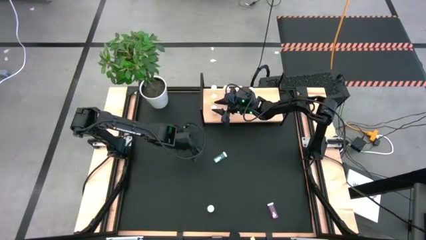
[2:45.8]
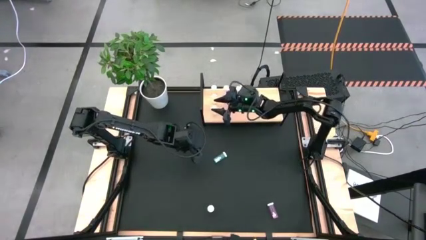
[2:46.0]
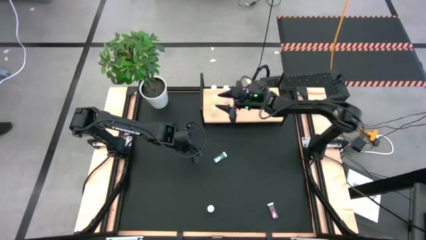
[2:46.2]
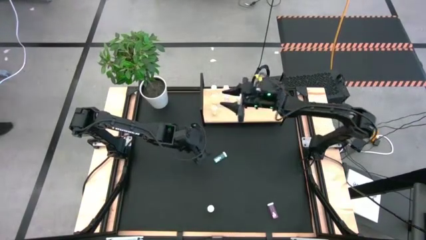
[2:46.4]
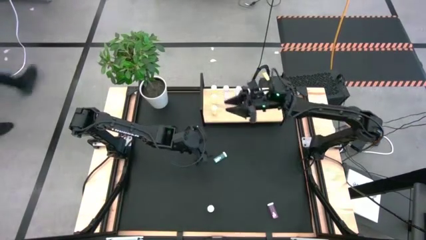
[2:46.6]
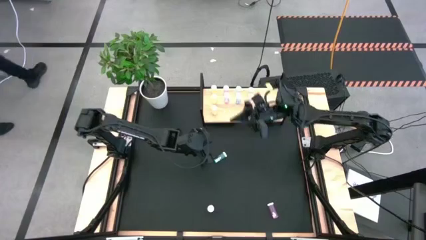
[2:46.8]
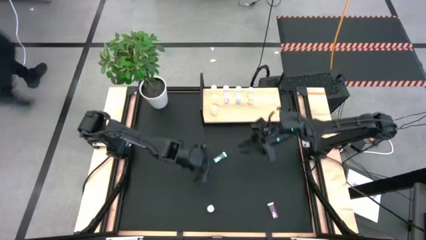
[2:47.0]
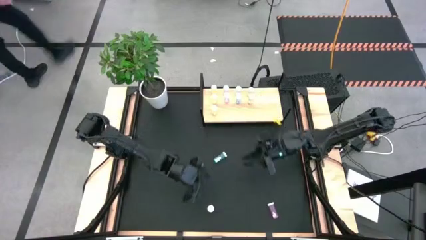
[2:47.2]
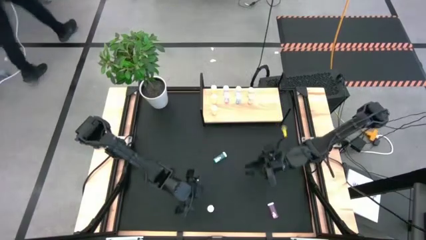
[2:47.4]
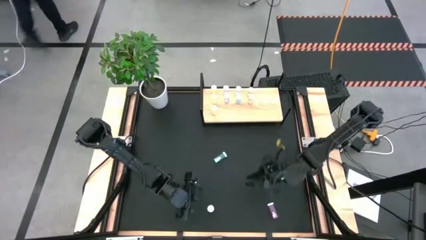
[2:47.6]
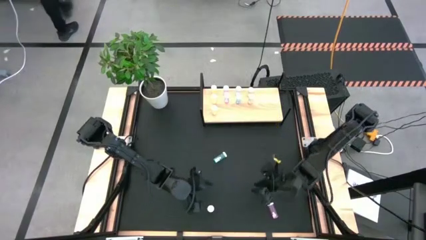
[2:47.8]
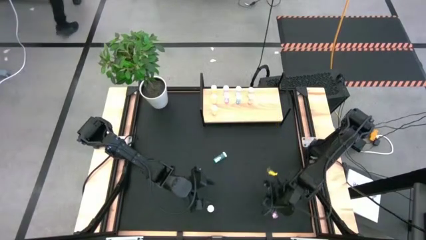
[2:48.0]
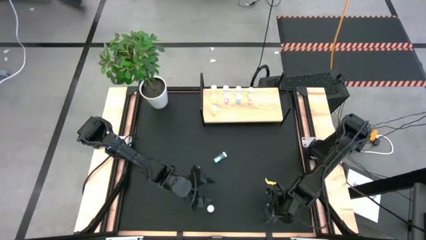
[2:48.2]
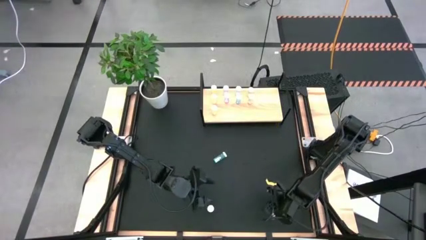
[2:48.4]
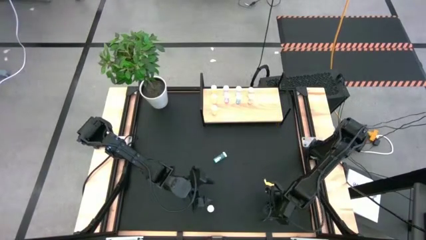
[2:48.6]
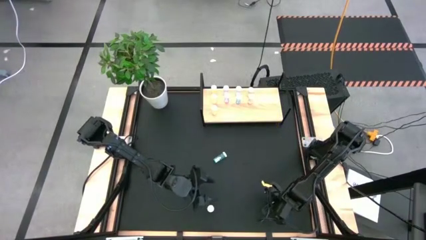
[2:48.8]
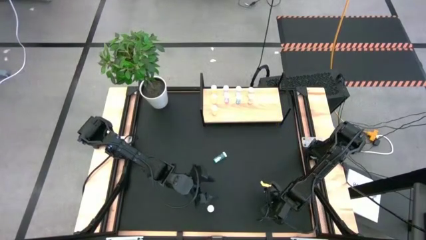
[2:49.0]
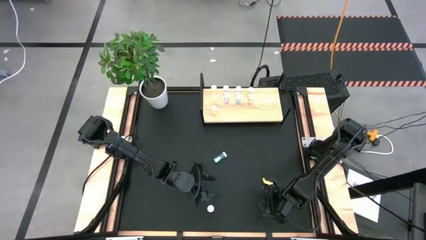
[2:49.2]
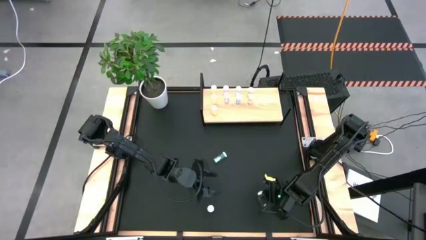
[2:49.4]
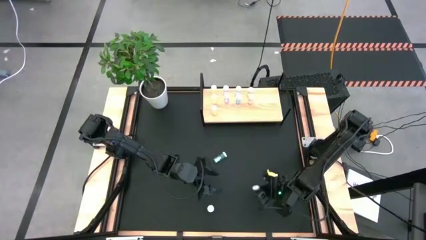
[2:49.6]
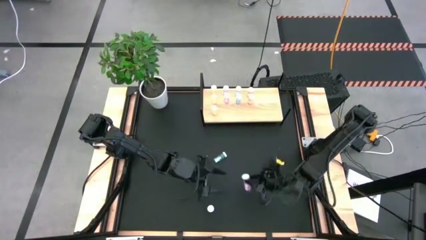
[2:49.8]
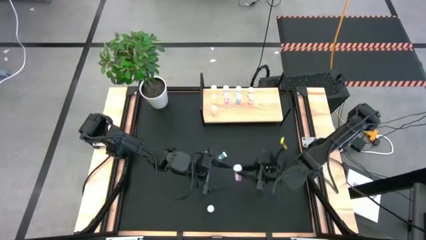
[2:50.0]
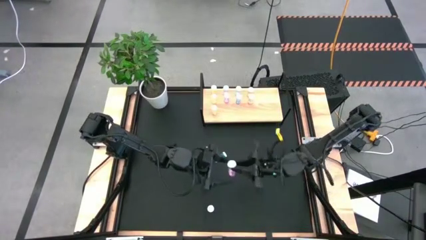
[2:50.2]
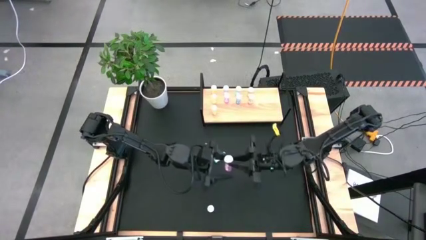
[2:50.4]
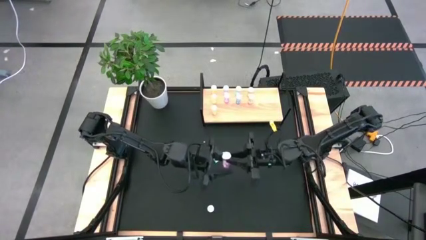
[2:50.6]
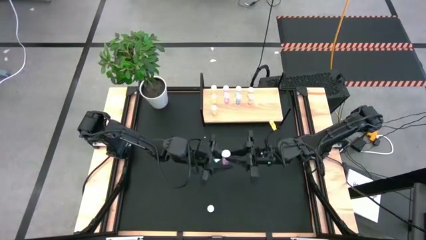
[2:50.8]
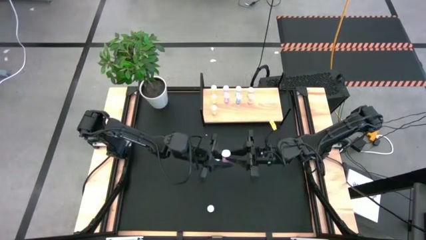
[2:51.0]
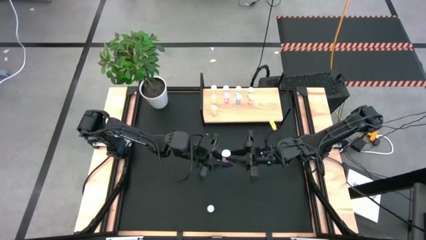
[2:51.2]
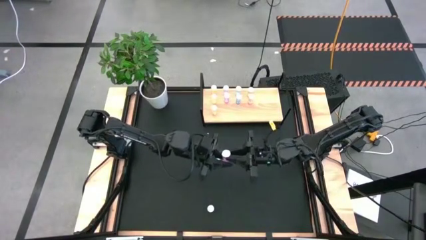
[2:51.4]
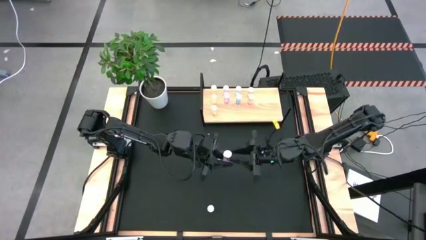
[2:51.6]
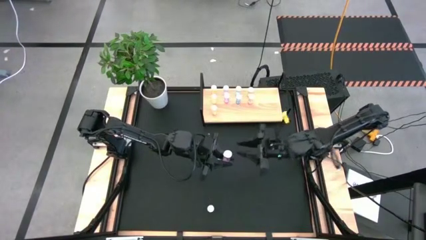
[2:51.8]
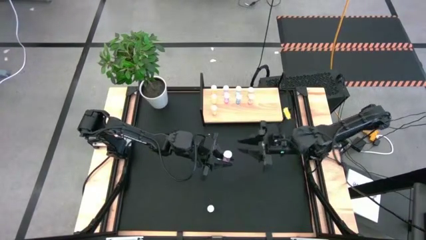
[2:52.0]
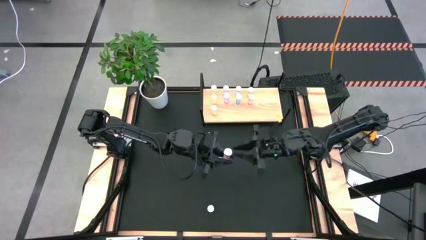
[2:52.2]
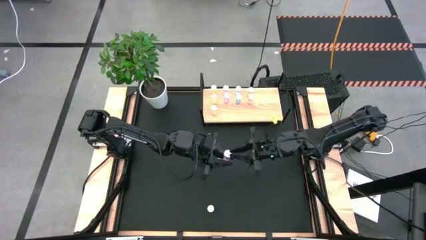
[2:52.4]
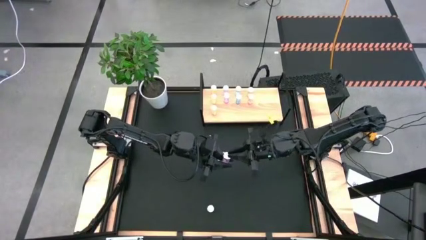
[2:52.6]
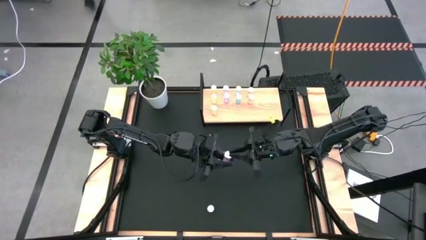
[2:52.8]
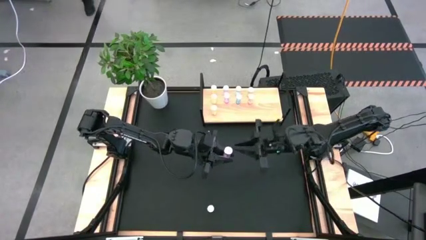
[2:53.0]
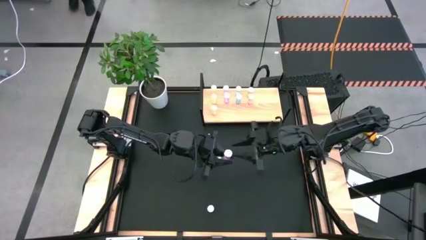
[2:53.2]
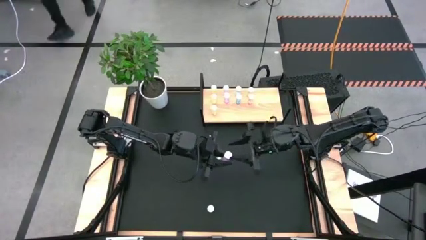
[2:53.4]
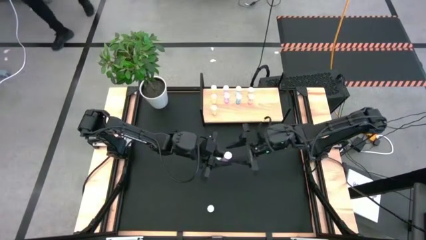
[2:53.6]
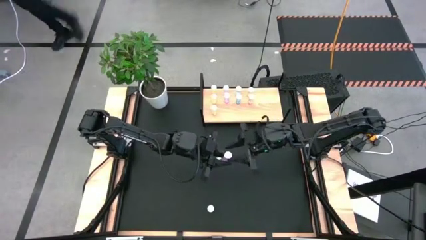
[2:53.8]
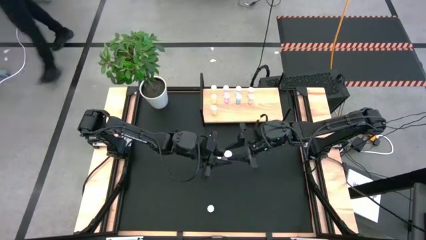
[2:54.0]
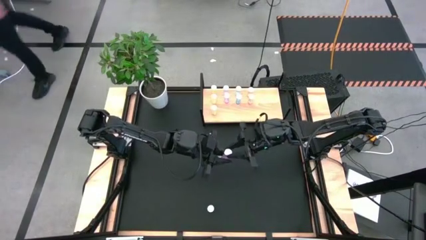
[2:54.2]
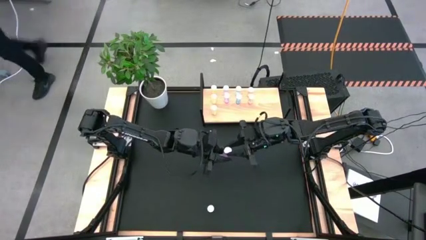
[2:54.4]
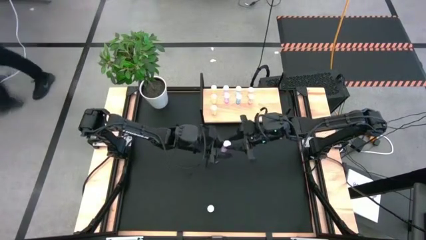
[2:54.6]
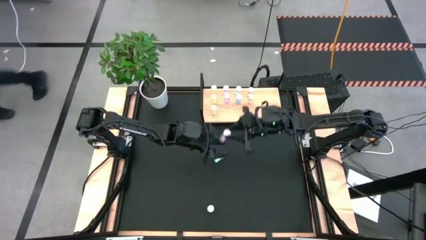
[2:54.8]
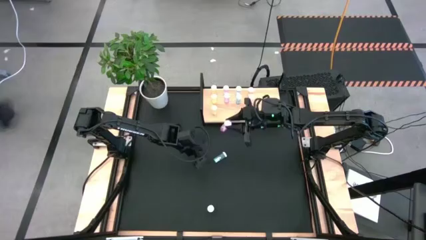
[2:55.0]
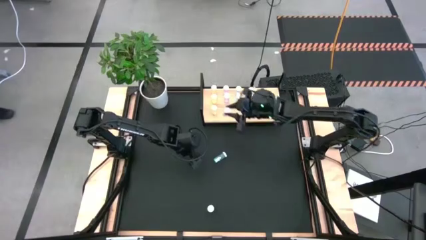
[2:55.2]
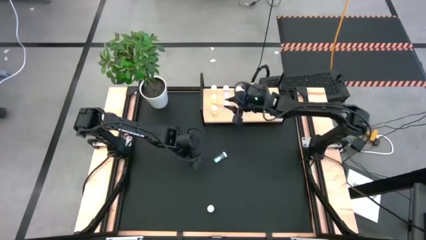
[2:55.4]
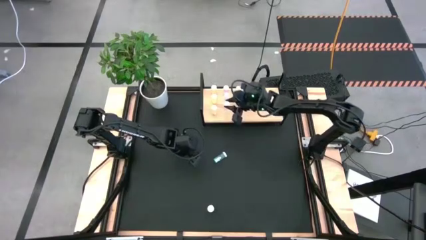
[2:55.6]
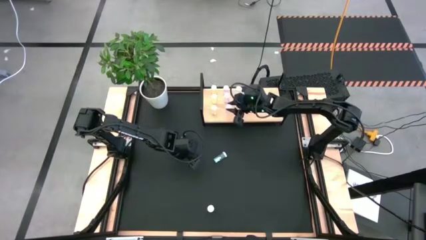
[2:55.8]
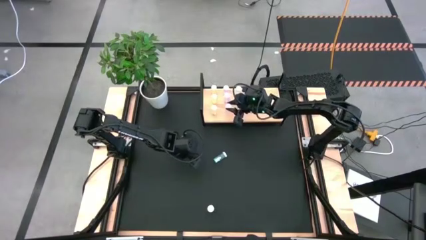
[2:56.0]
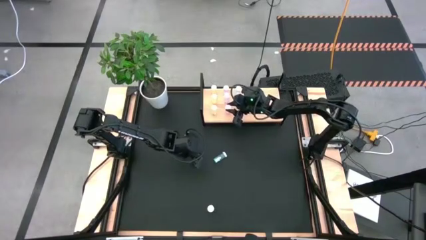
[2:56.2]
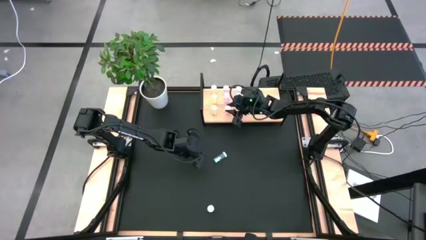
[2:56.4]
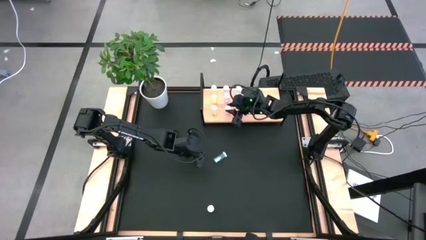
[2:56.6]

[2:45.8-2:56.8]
Task: Pick and place medicine bottles onto shelf by color
Put the pink pill bottle on the shelf aligned with the other pink pill bottles

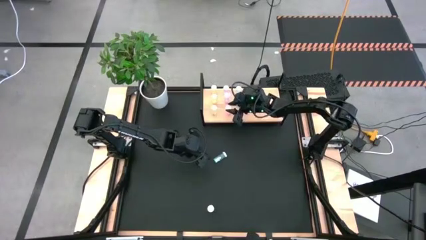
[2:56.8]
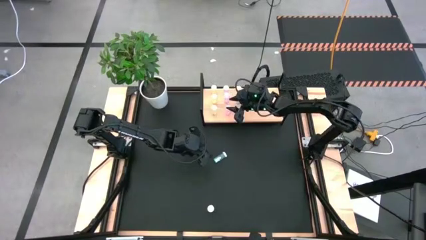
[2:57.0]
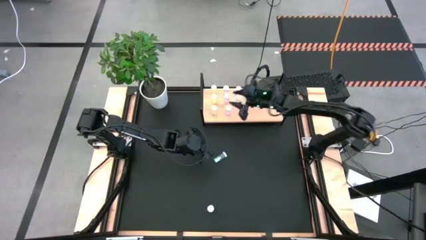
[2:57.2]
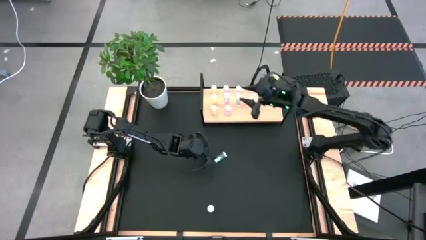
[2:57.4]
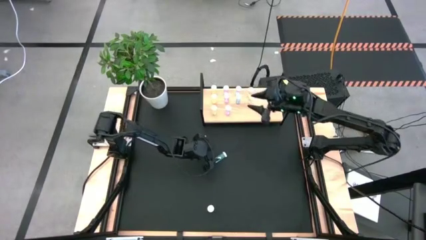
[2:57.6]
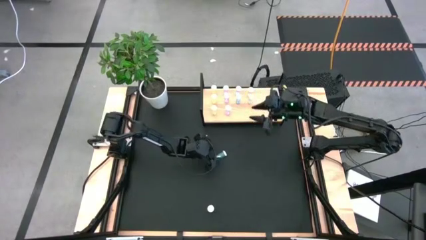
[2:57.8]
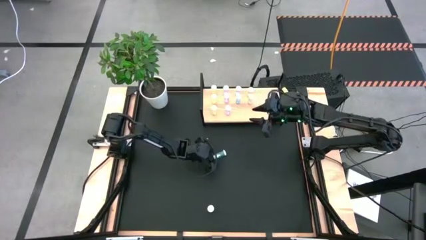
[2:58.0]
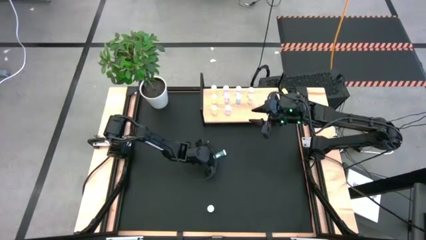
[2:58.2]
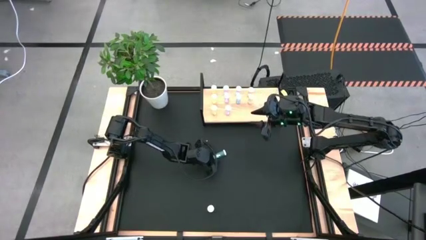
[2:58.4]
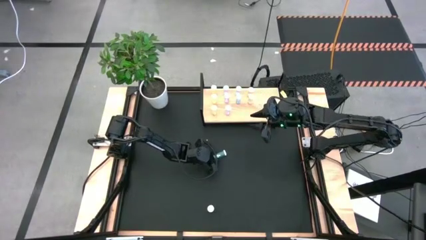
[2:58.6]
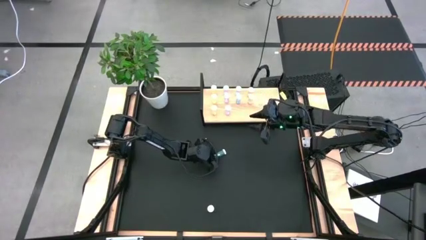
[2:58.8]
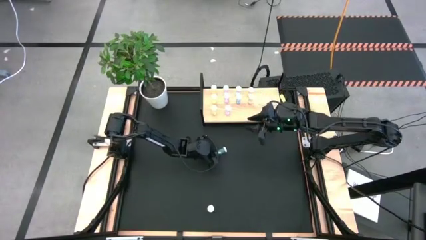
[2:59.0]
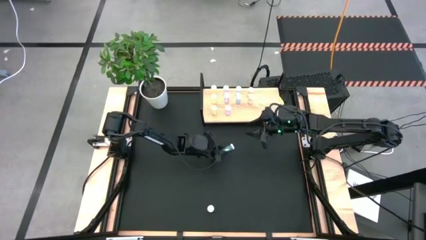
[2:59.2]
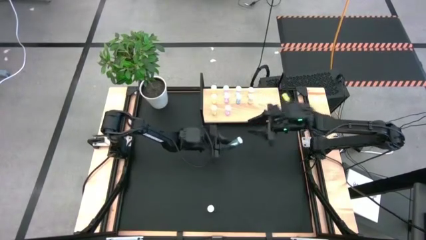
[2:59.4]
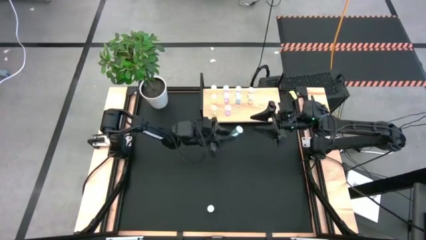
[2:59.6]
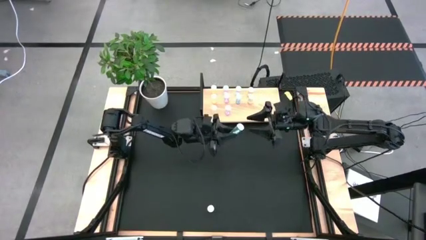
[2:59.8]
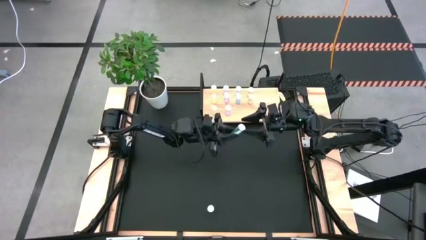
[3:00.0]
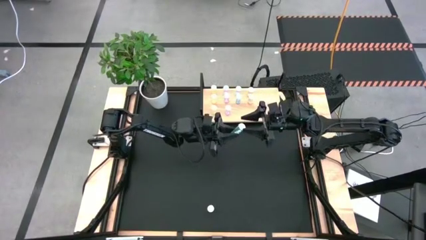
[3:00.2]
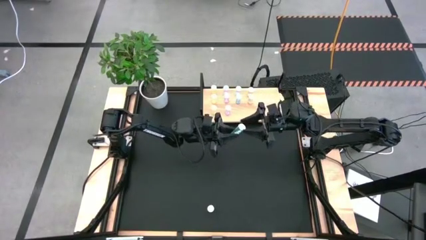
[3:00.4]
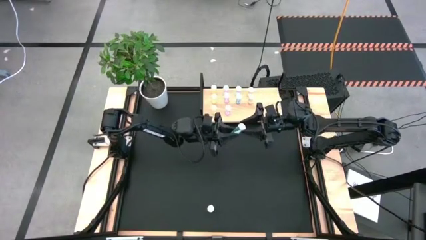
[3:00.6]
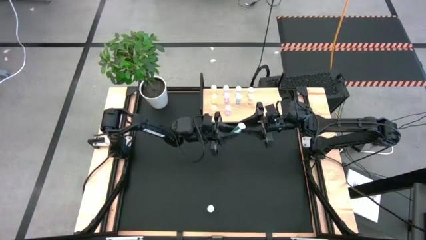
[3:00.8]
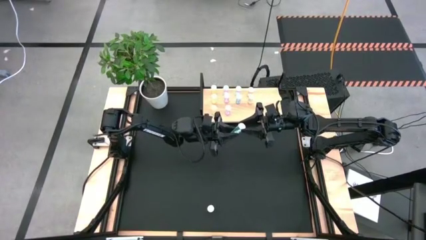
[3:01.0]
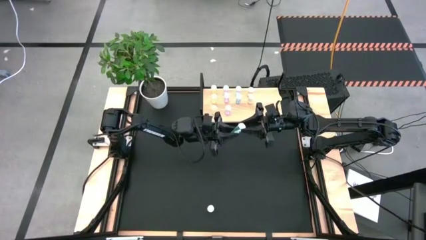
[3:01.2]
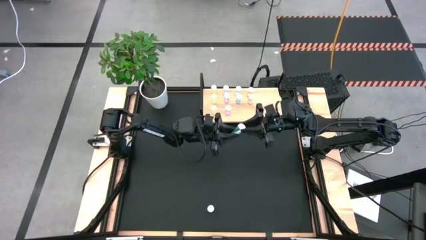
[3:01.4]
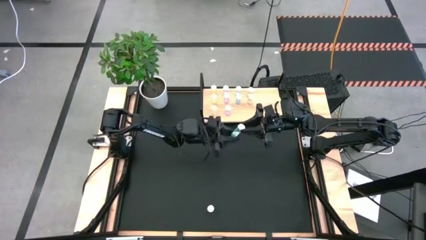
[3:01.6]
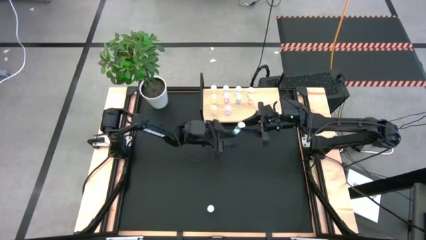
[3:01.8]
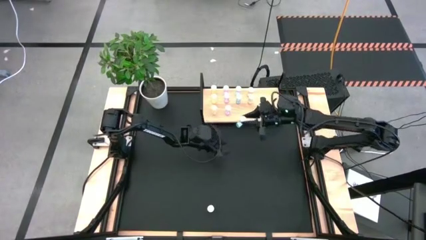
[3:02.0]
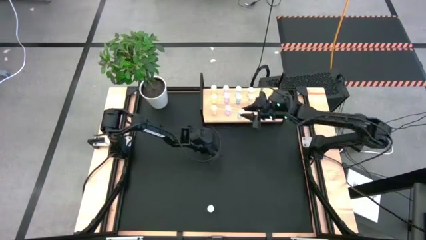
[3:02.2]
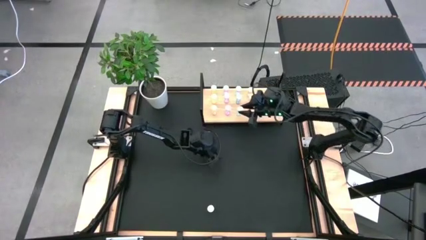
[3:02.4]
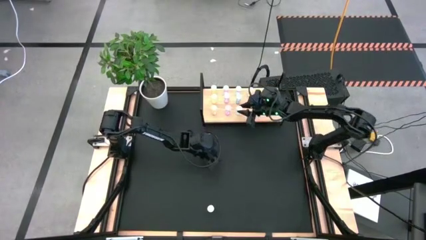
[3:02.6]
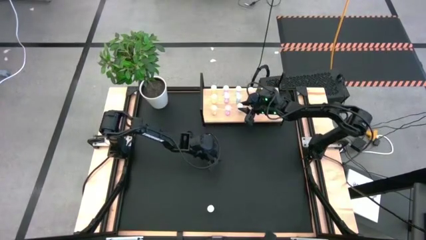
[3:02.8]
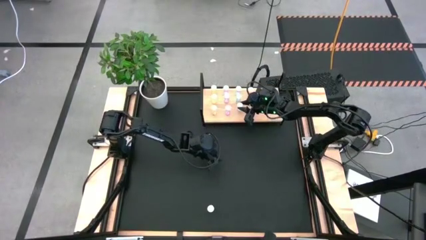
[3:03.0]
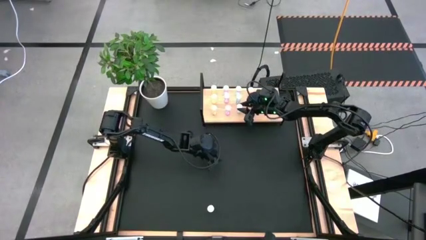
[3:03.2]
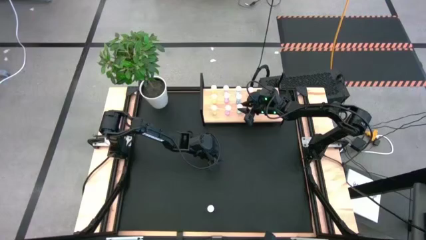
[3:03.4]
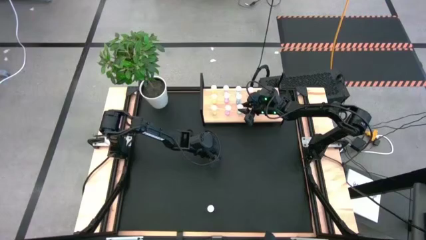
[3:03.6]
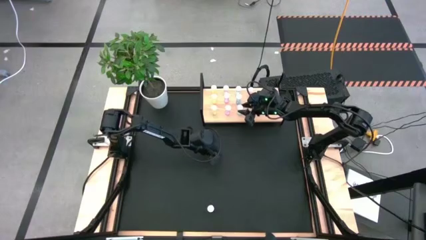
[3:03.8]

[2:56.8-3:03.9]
Put the blue pill bottle on the shelf aligned with the other blue pill bottles
